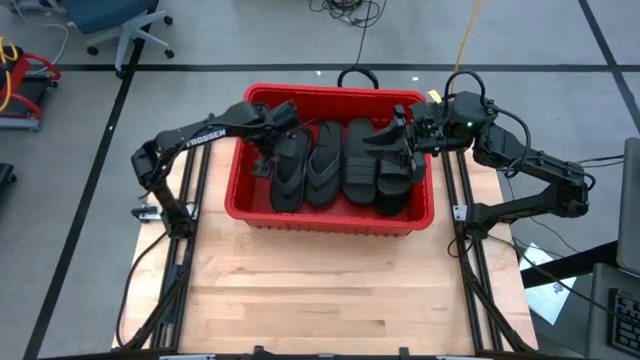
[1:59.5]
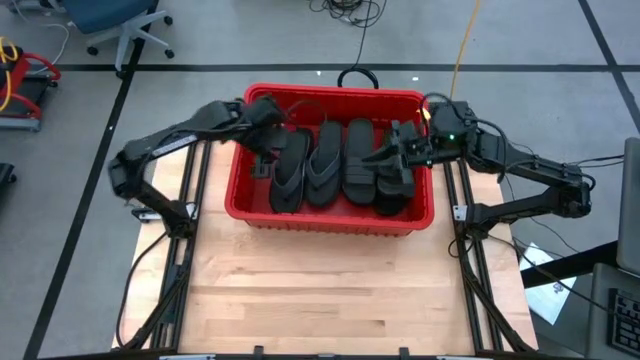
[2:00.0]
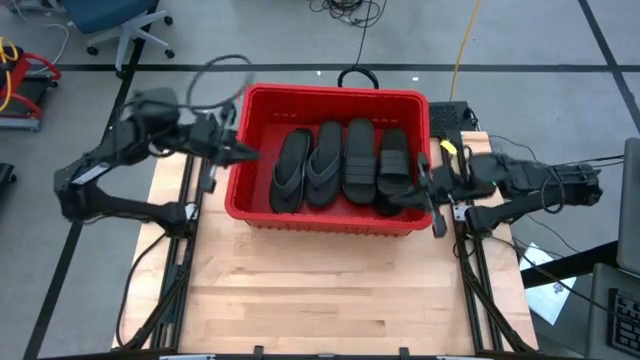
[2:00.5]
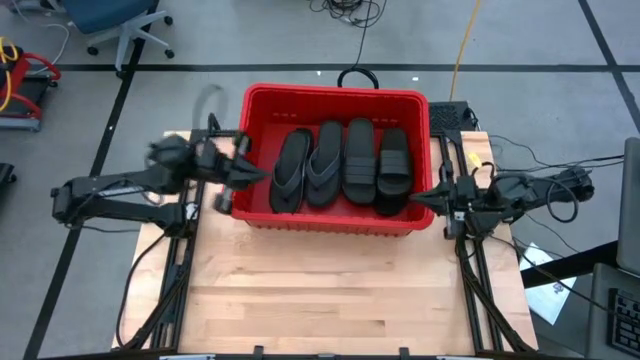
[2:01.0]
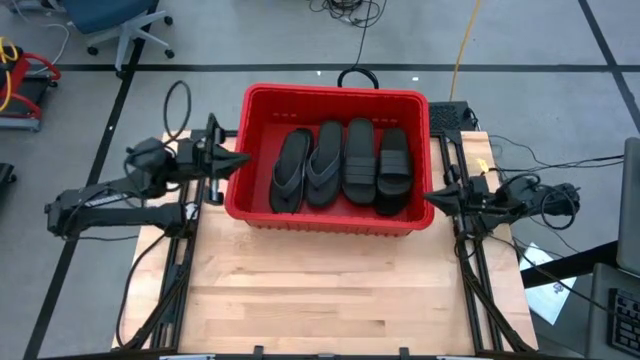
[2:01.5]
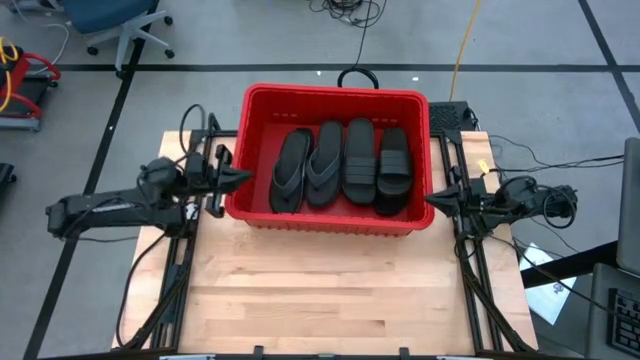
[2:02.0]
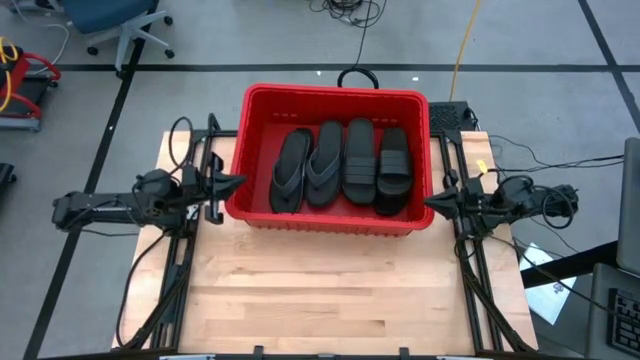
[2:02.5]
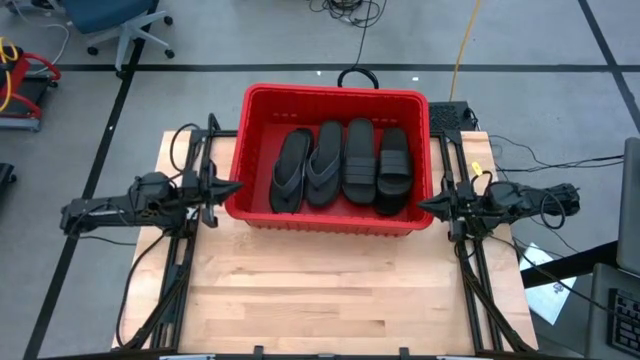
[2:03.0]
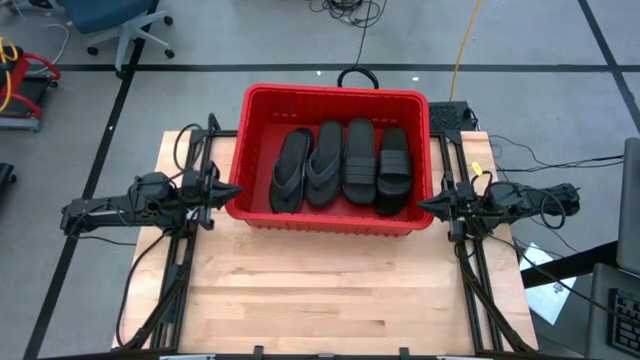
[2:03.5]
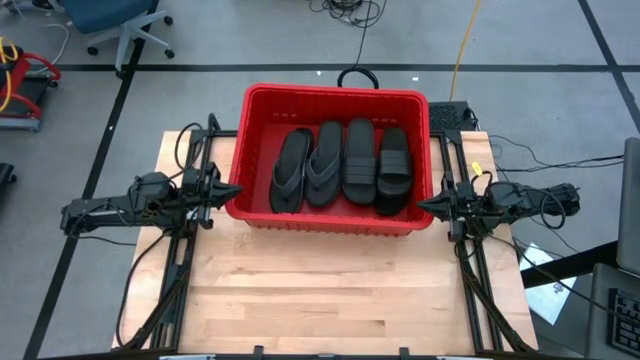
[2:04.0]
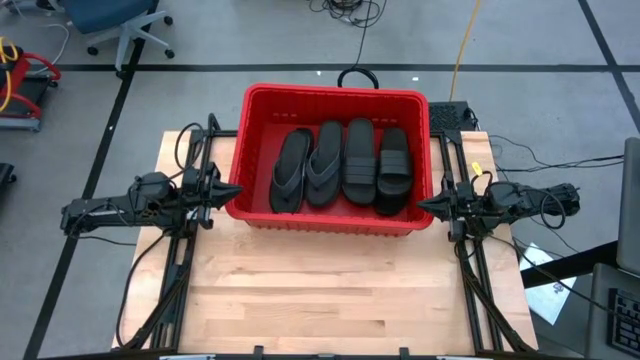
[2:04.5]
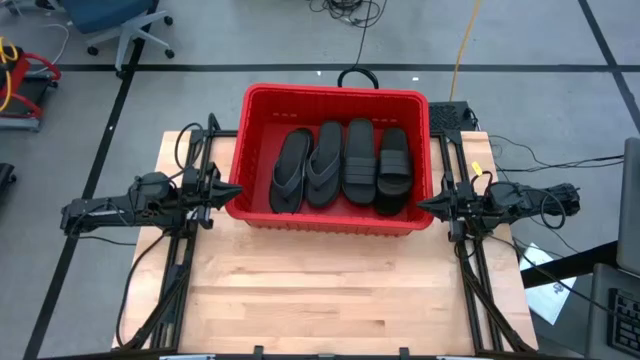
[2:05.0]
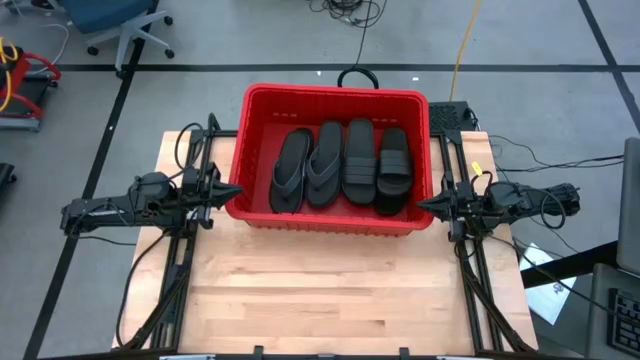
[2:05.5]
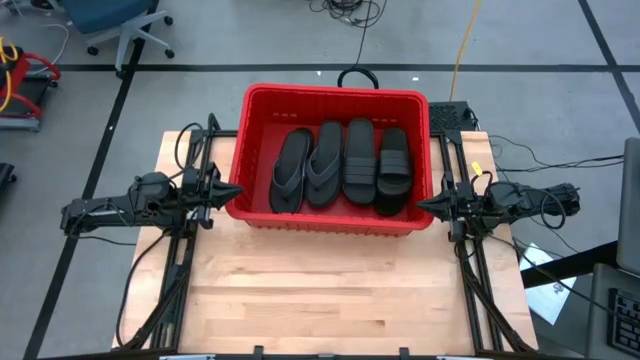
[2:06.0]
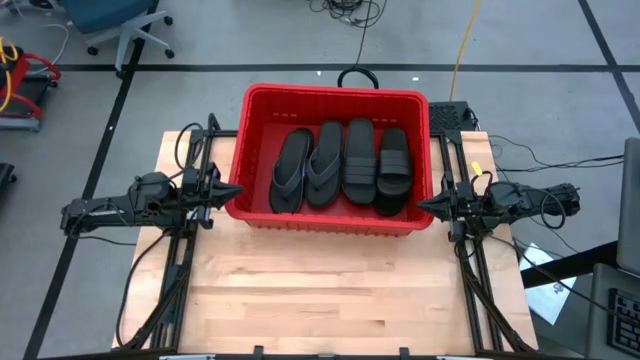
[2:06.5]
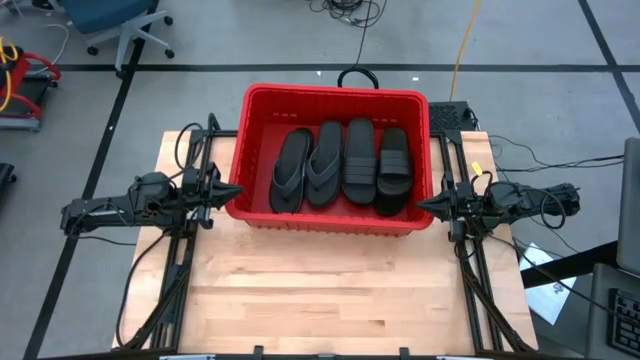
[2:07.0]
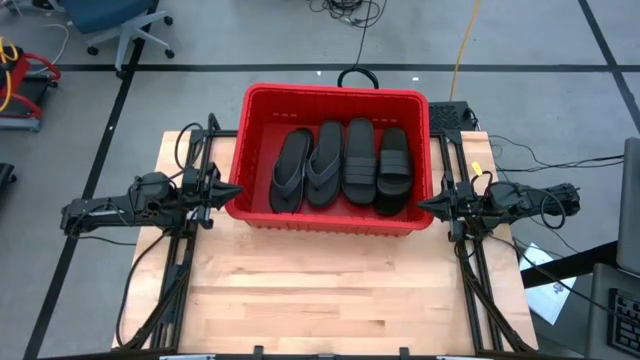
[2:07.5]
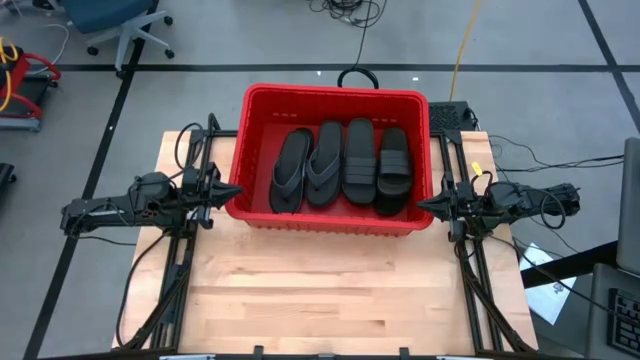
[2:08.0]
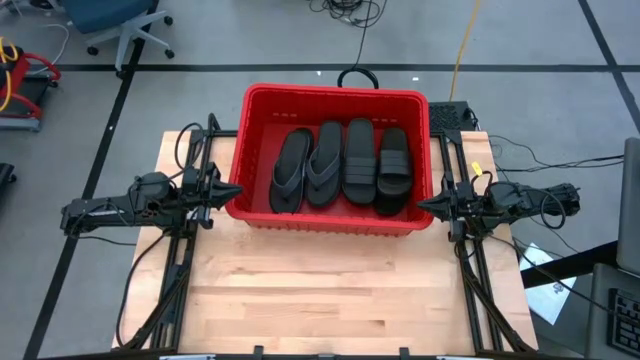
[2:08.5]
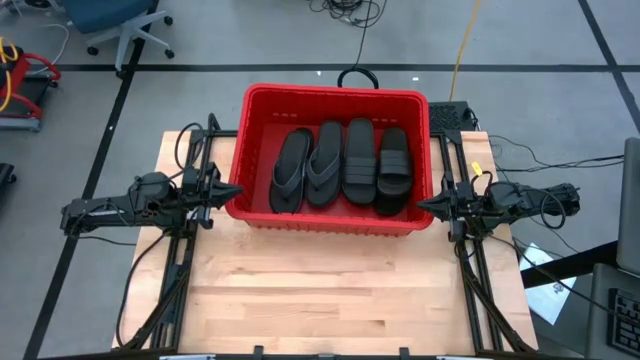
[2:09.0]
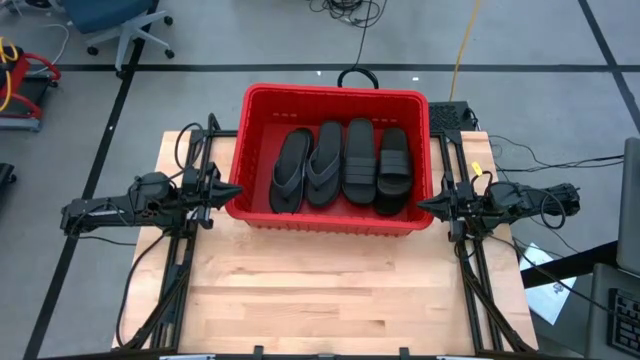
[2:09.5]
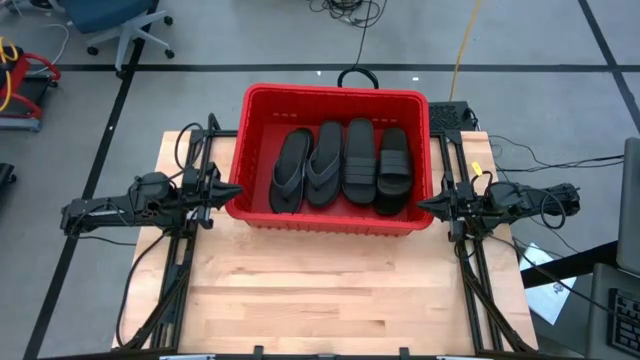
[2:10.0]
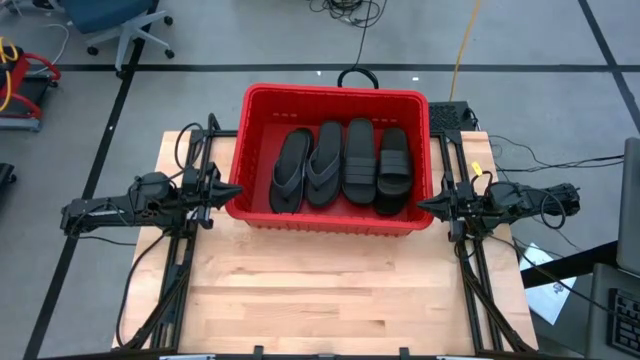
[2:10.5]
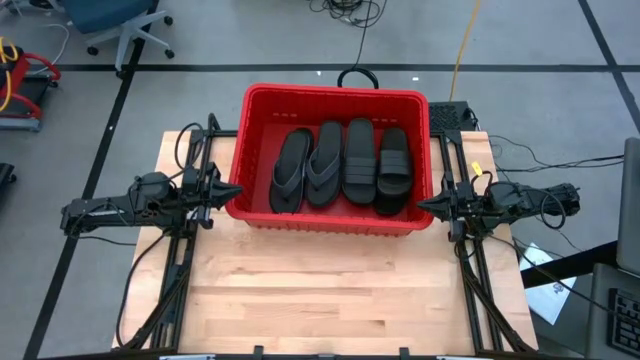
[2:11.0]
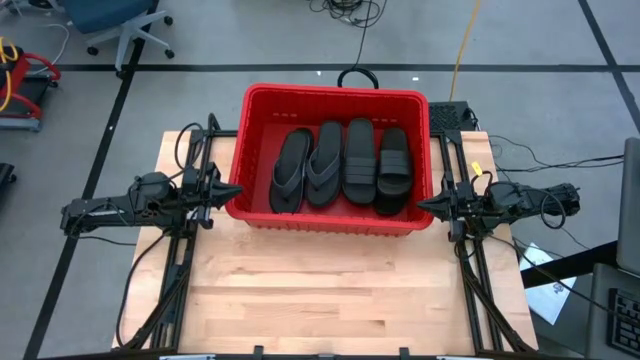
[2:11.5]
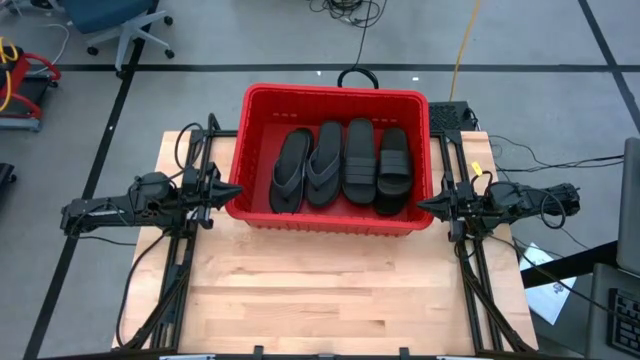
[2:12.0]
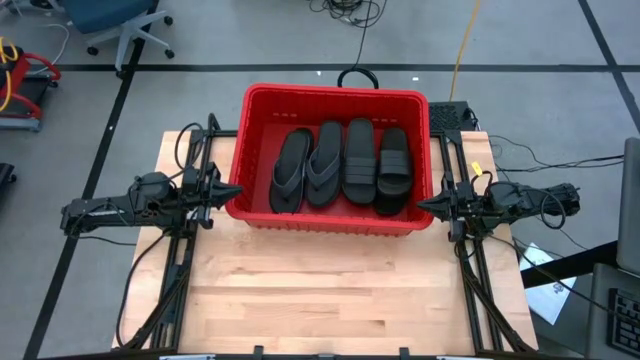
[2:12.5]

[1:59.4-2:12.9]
Task: Pick and place slides into bin
Return to Home Position

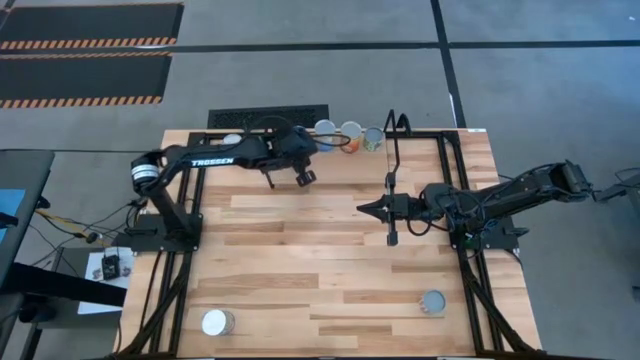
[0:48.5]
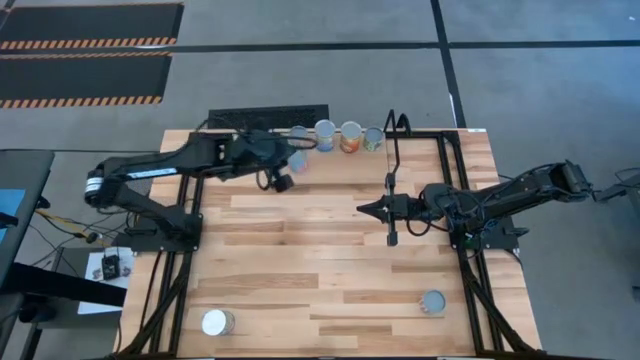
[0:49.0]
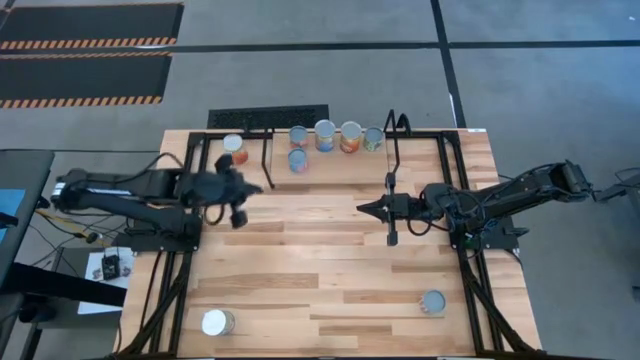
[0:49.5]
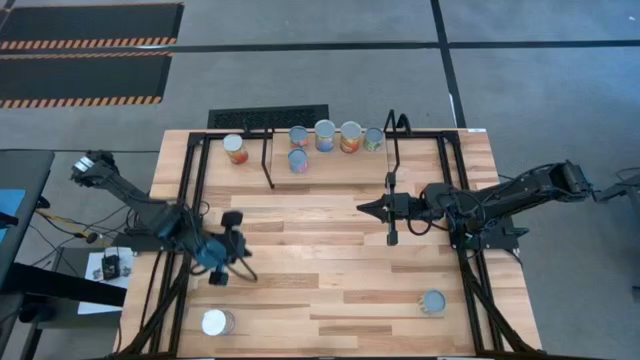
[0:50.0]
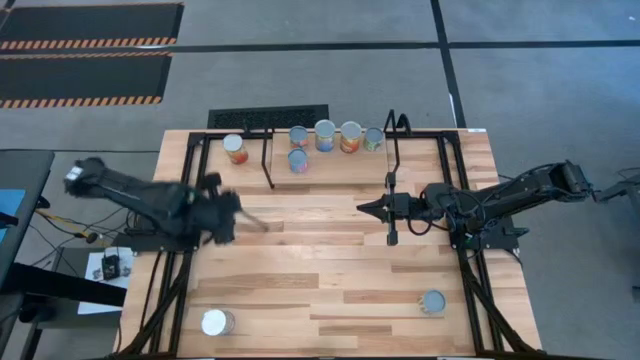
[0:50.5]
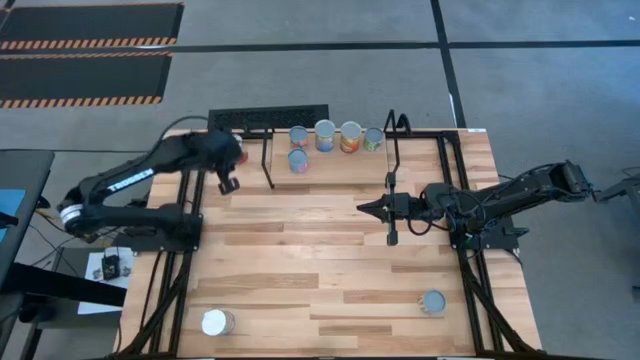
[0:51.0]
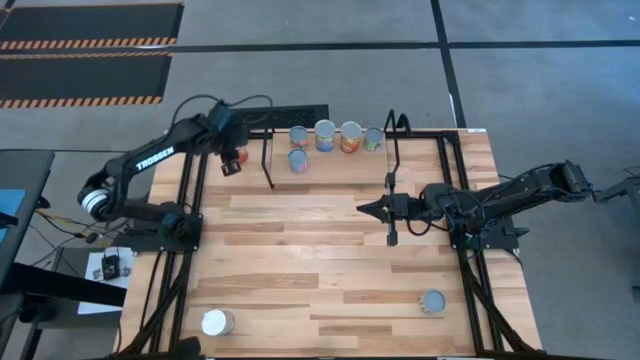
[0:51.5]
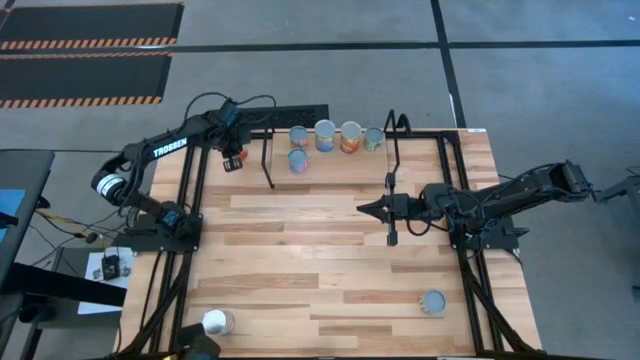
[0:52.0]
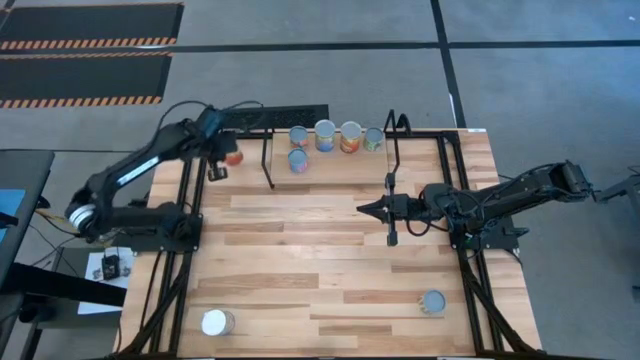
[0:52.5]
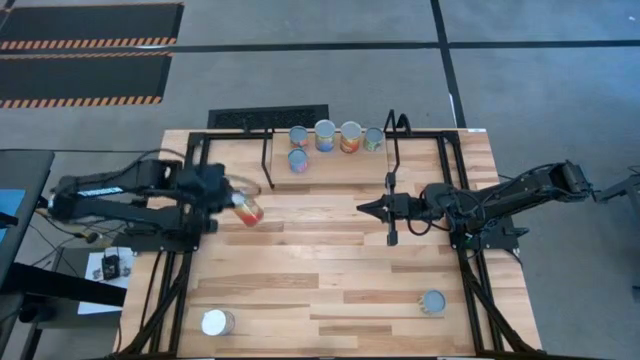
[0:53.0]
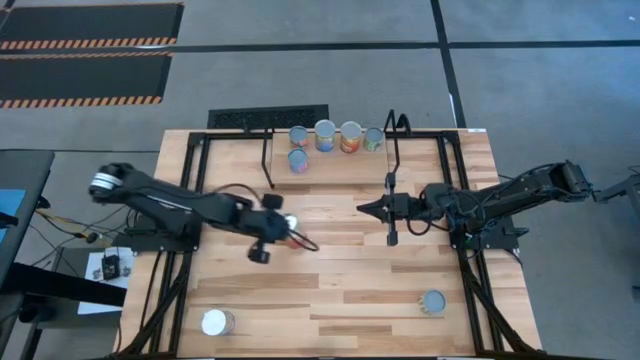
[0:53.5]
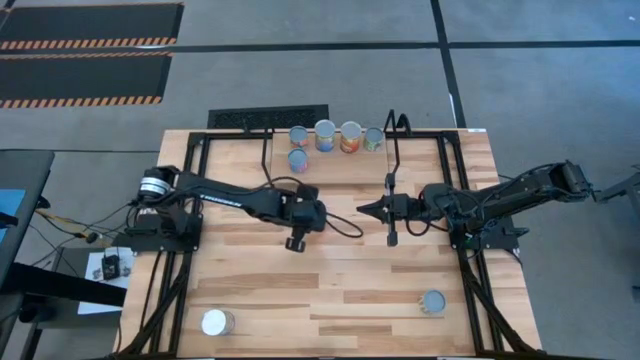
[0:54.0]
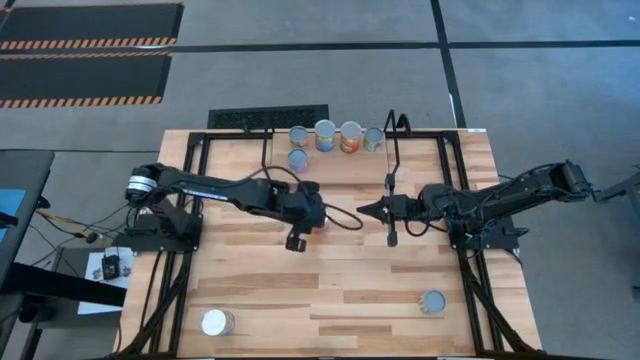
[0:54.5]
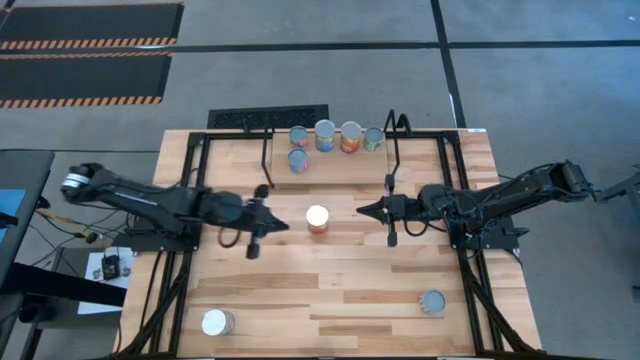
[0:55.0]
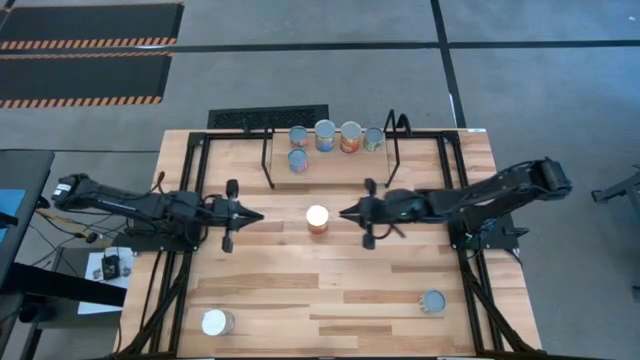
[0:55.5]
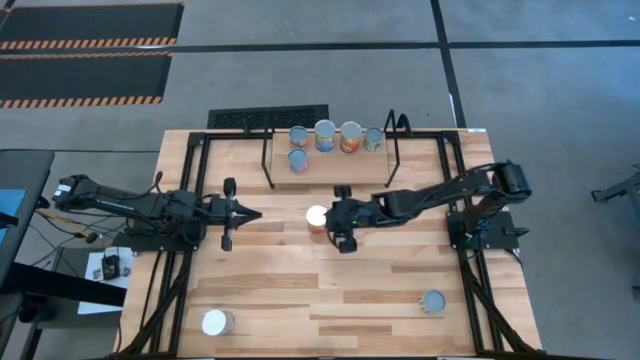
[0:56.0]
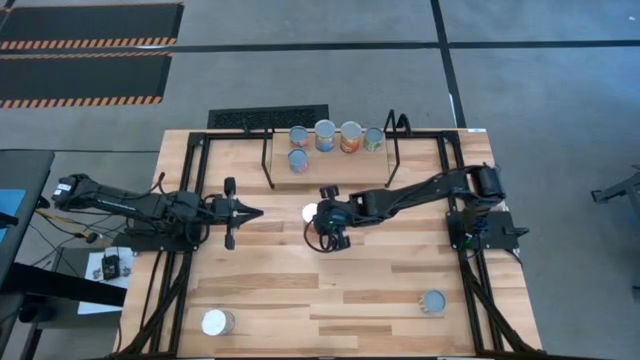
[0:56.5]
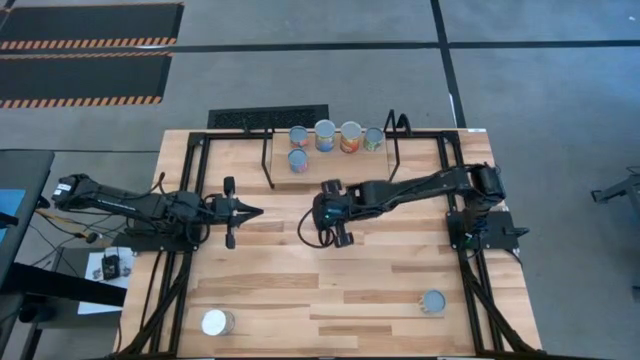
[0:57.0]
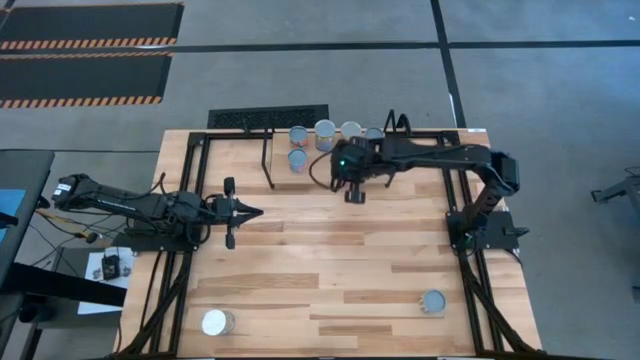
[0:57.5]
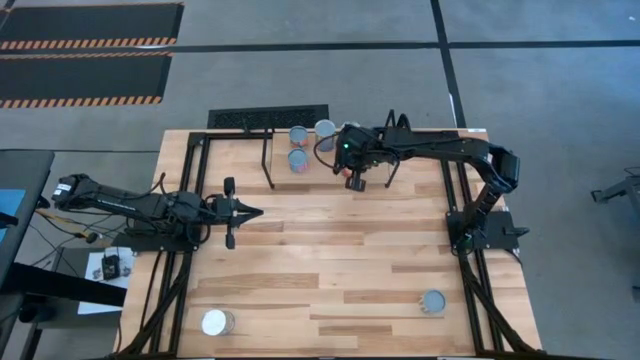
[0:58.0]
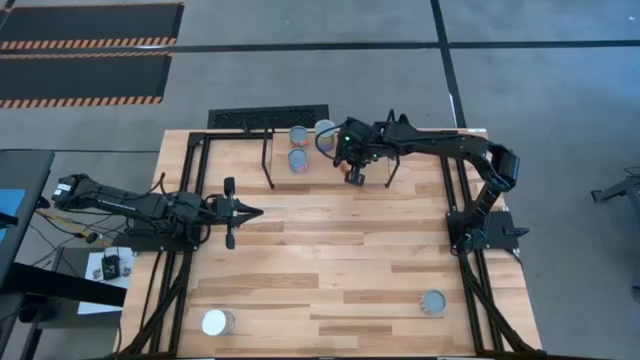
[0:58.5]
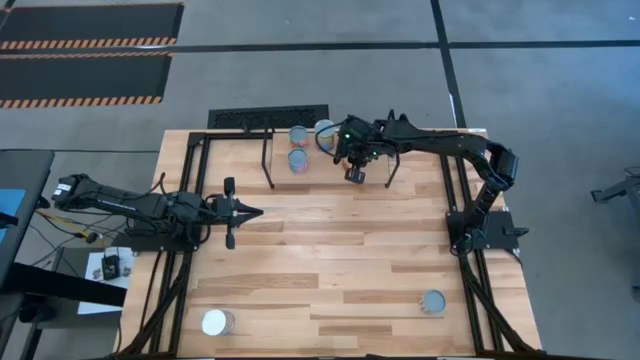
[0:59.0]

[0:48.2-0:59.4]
Task: Pick and place cans onto a shelf
Put the canned corn on the shelf aligned with the canned corn on the shelf
